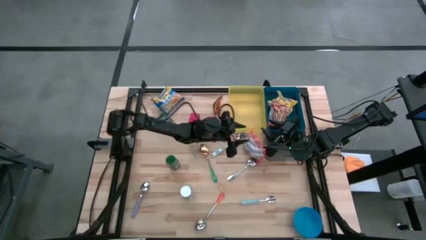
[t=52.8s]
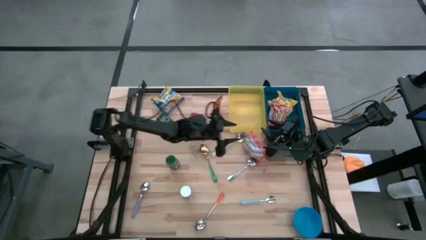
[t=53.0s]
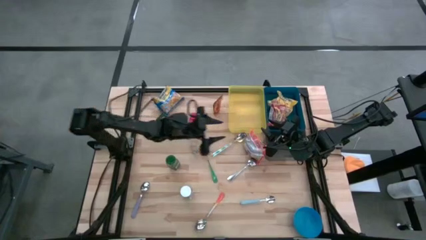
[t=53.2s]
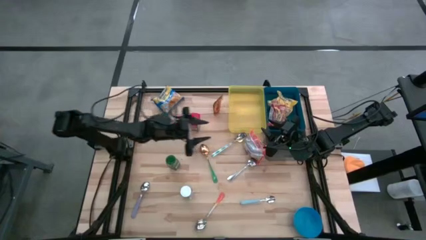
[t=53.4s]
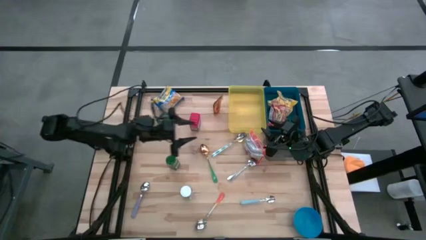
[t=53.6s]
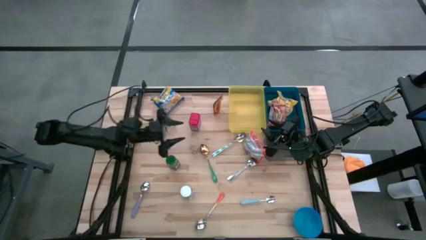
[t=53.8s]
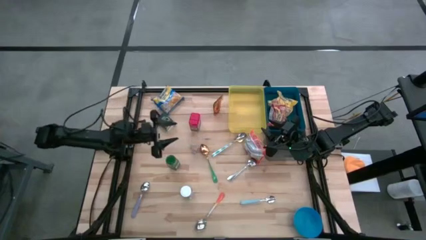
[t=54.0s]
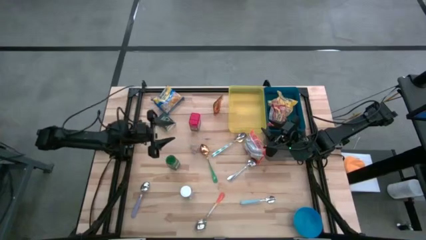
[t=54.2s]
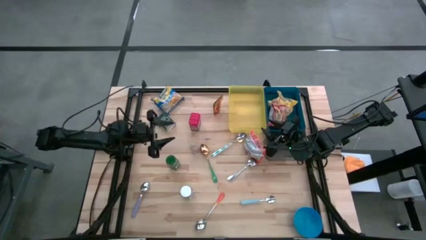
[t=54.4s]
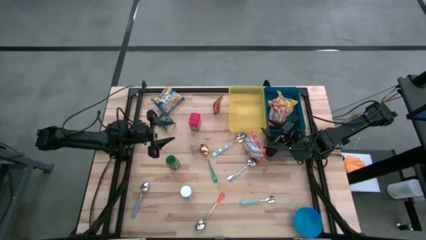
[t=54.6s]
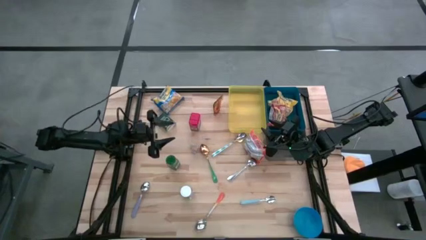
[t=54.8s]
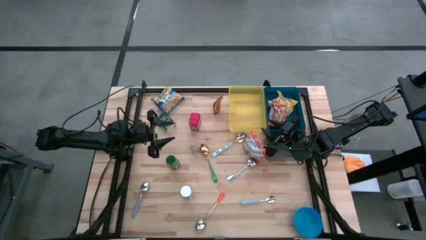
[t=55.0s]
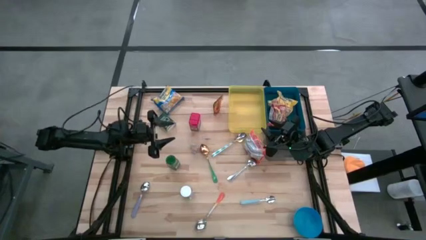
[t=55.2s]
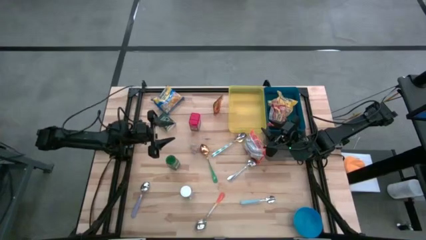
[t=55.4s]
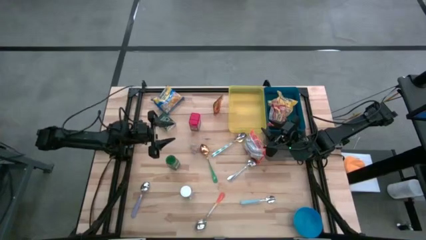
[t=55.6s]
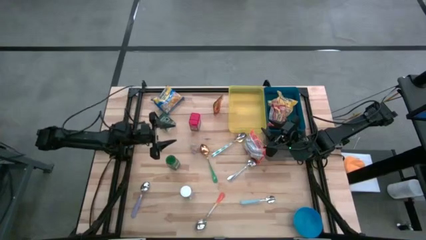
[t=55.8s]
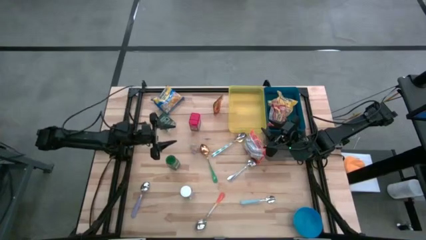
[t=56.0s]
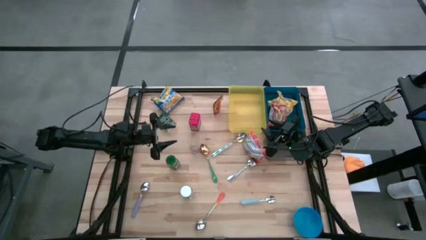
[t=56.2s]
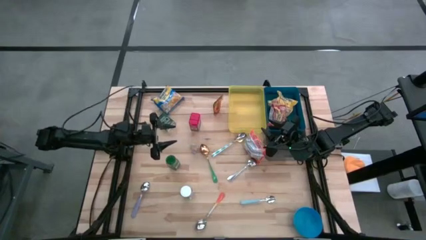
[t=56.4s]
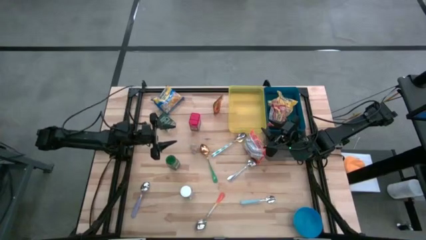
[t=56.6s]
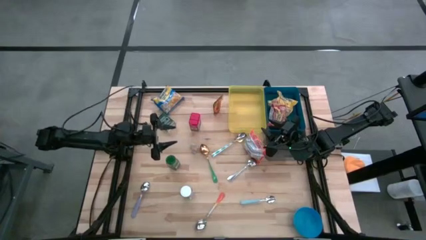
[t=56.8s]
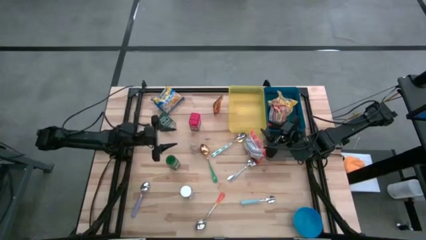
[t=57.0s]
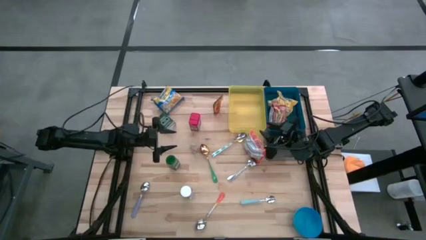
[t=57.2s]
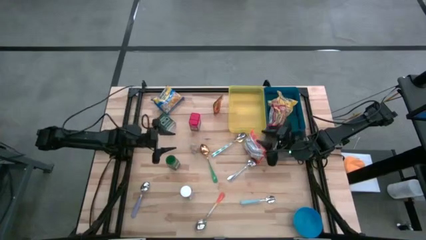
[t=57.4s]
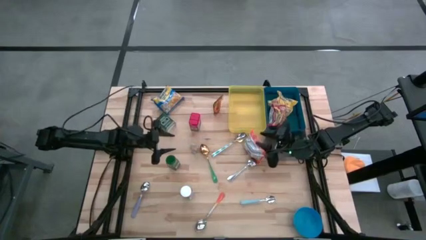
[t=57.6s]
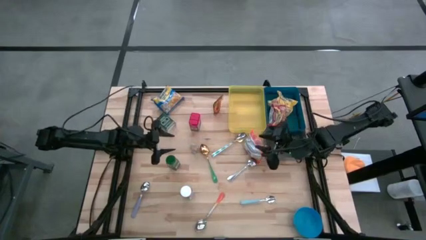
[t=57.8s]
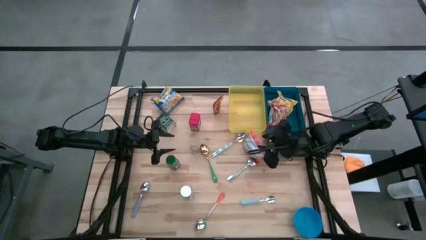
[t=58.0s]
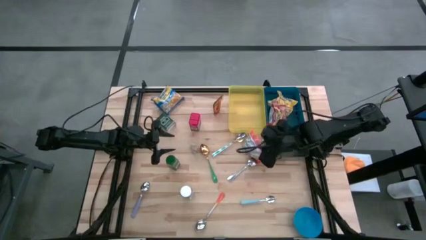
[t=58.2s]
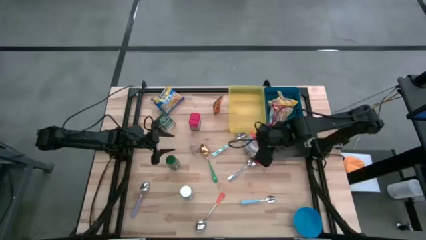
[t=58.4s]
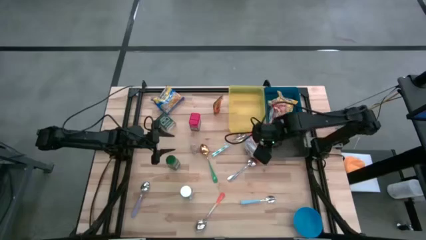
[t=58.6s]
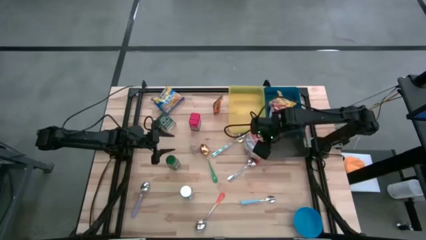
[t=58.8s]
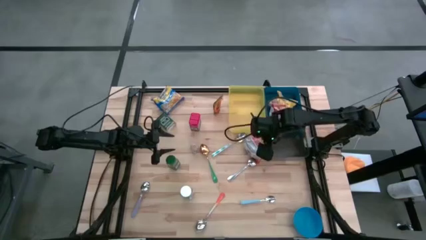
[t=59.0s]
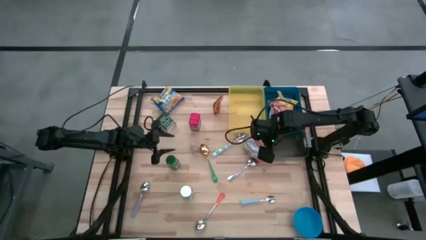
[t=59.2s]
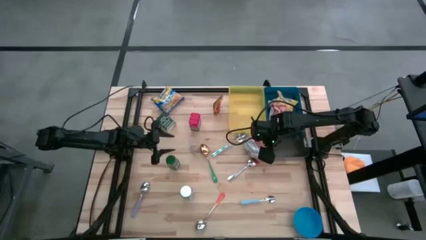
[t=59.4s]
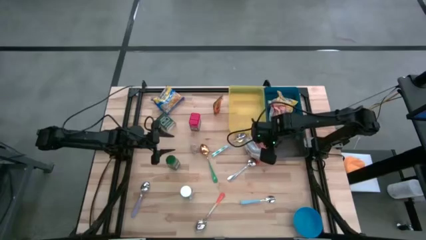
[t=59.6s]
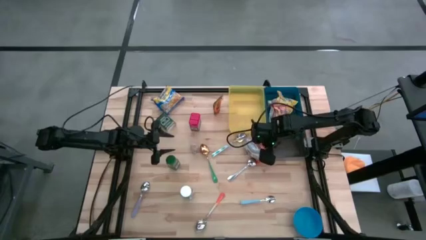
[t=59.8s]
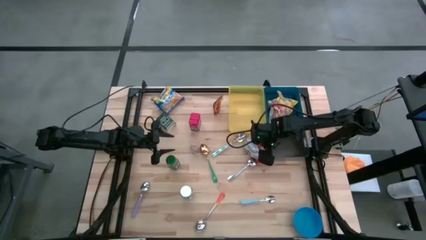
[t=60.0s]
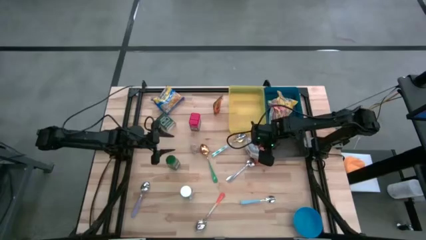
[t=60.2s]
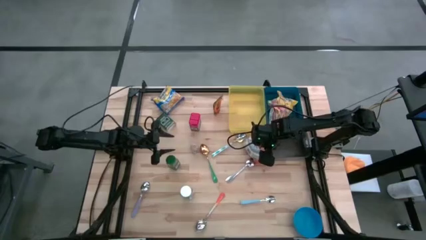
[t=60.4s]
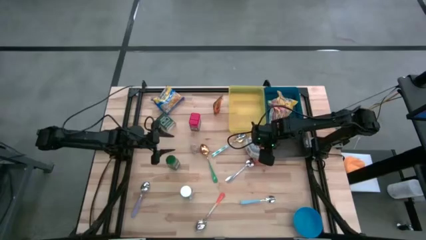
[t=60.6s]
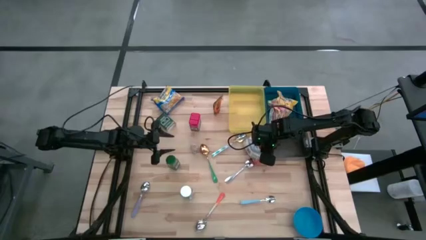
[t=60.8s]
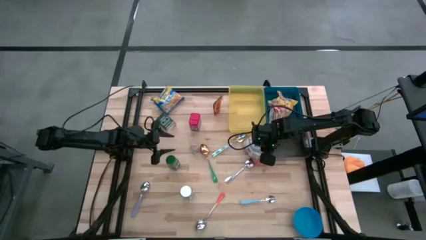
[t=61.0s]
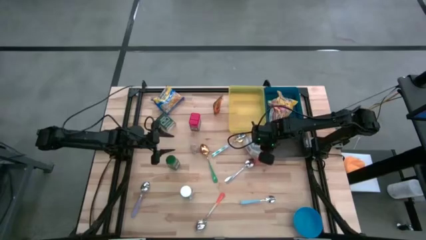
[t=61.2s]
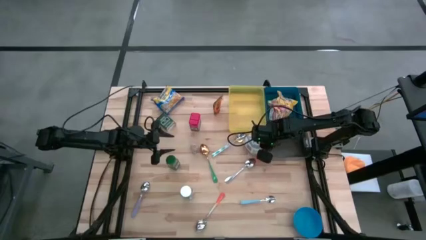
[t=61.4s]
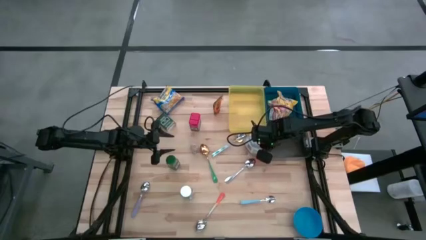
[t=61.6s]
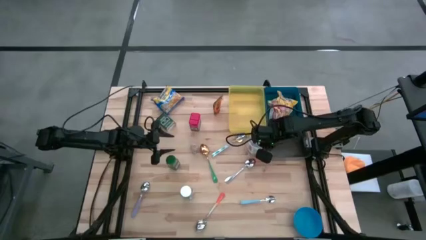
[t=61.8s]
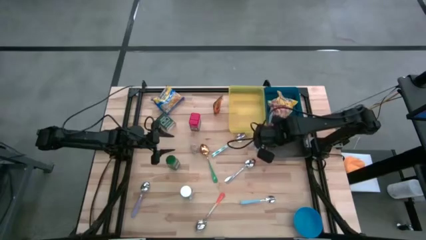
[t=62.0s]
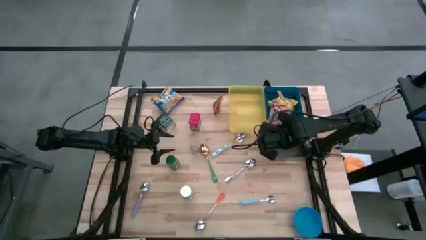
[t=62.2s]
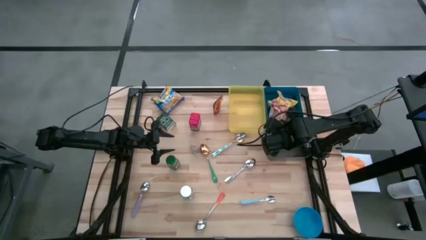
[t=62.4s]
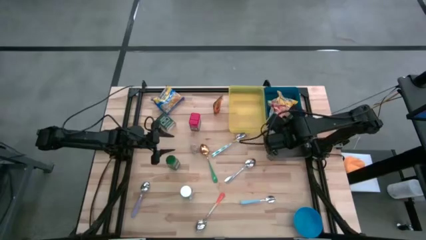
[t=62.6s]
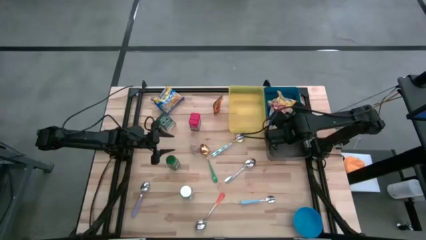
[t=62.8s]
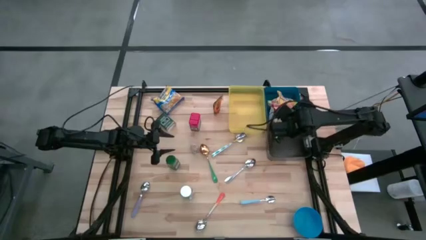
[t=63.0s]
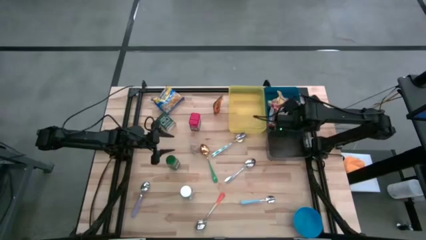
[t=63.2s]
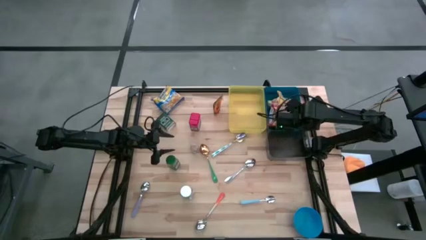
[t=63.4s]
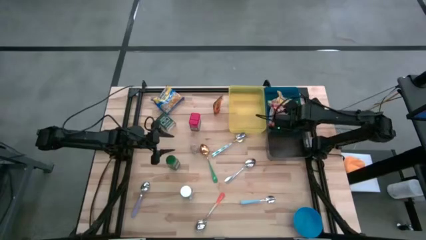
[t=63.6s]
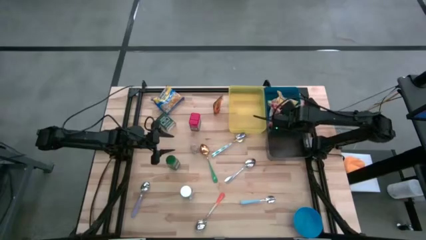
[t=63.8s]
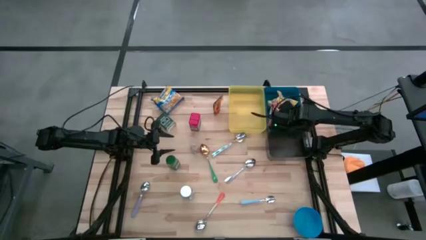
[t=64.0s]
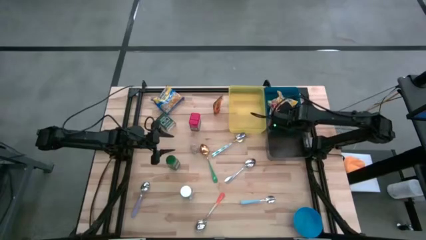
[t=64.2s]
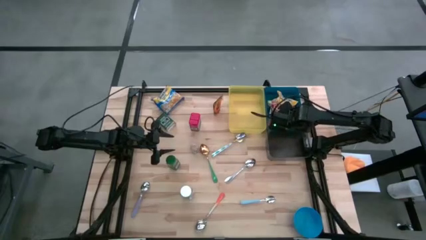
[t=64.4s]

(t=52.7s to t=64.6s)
Put the orange noodle pack into the blue bin
